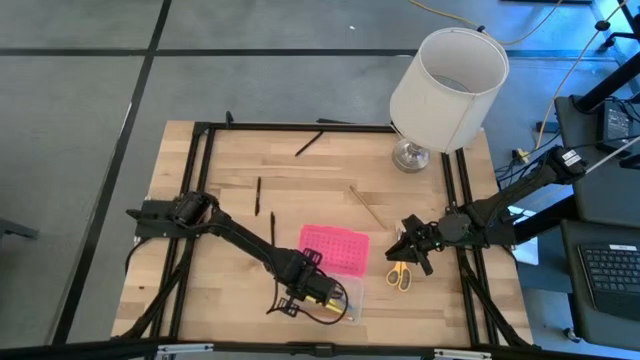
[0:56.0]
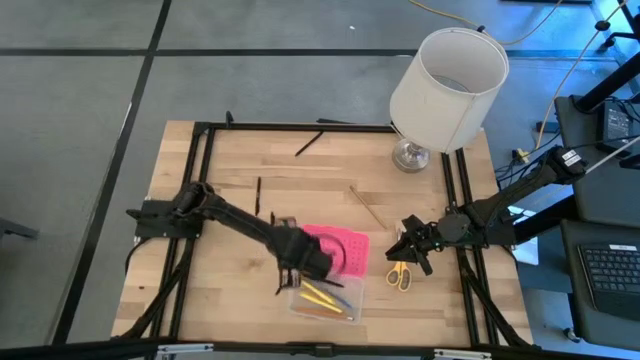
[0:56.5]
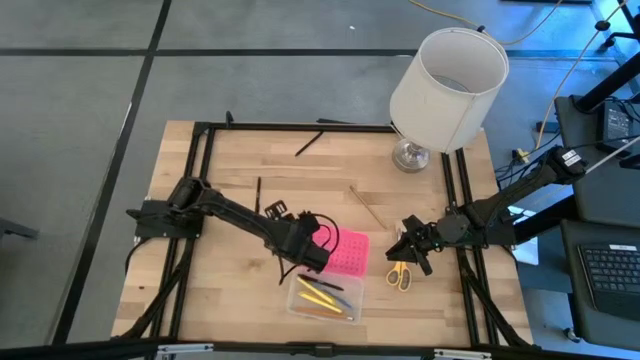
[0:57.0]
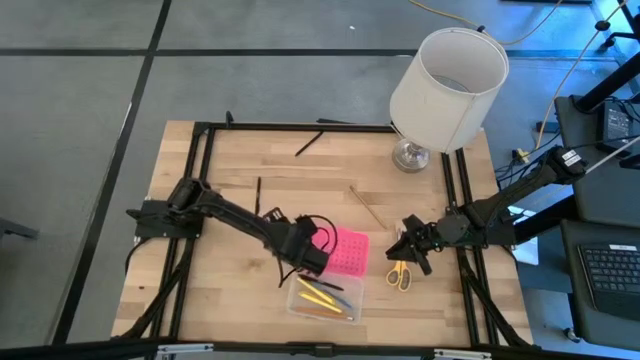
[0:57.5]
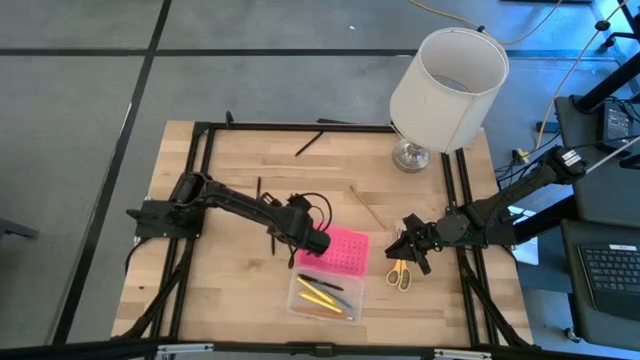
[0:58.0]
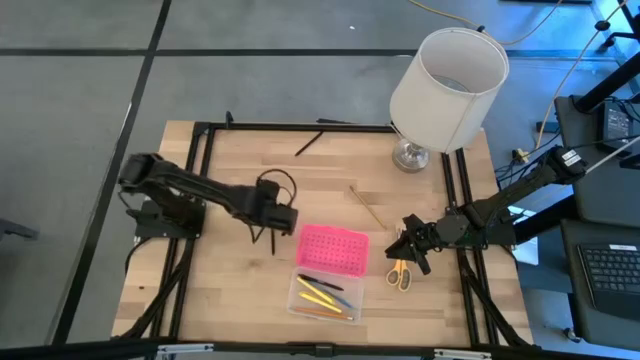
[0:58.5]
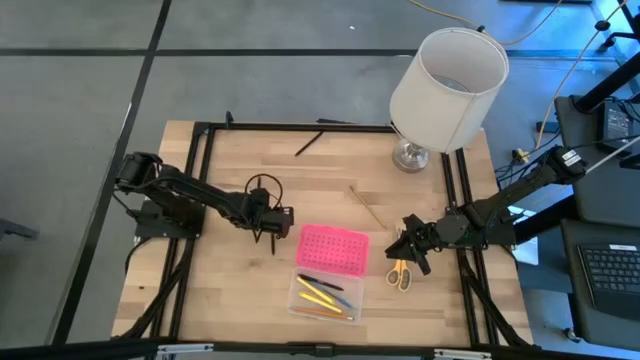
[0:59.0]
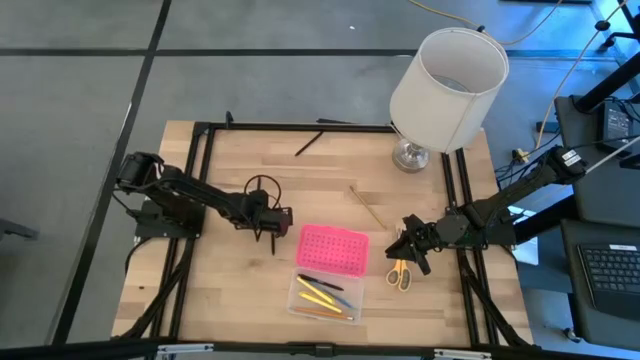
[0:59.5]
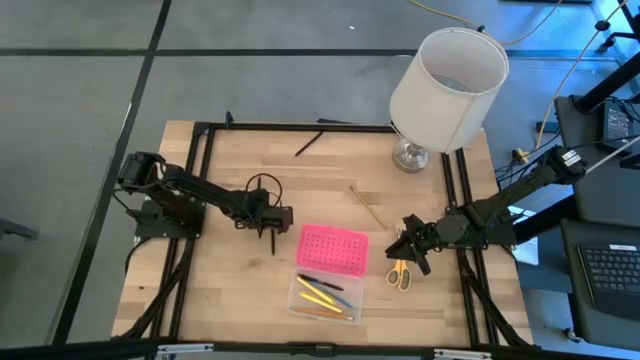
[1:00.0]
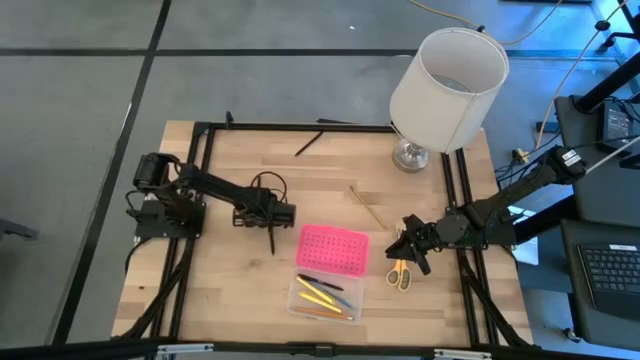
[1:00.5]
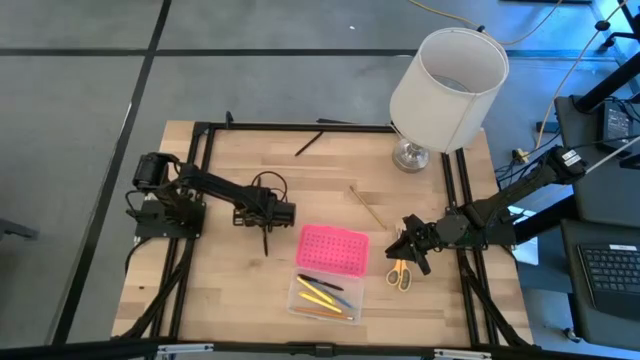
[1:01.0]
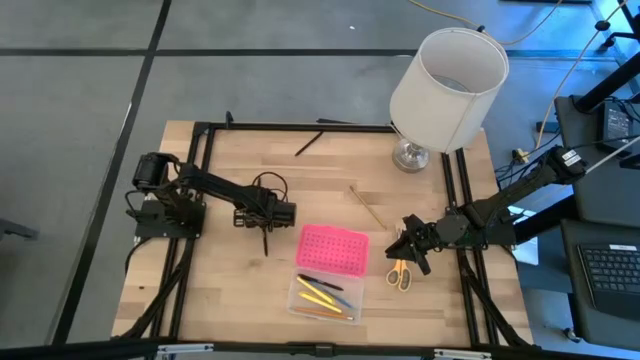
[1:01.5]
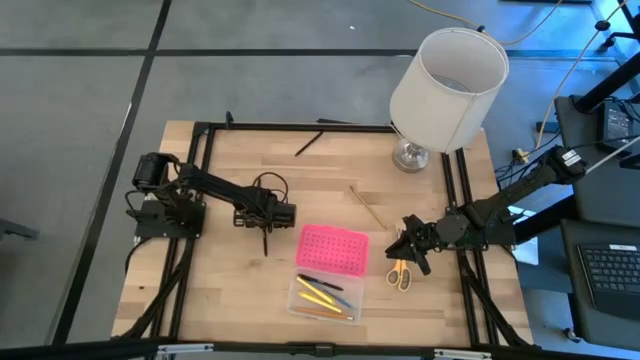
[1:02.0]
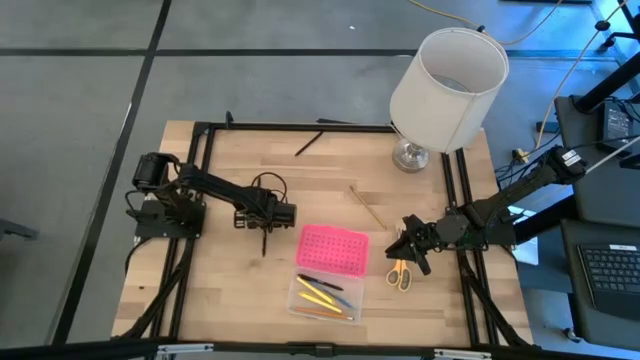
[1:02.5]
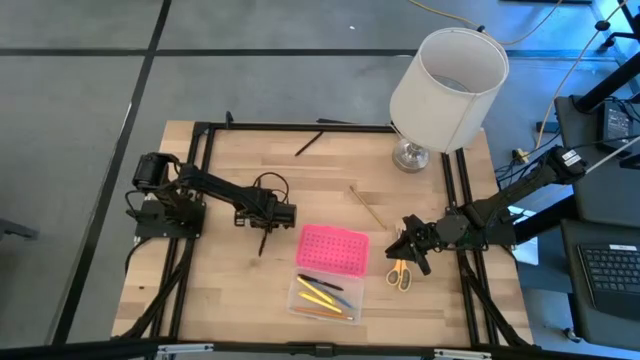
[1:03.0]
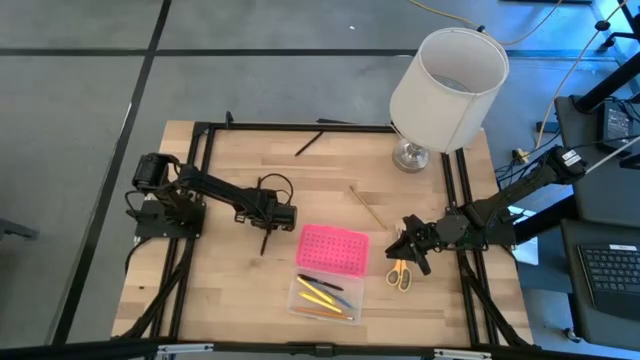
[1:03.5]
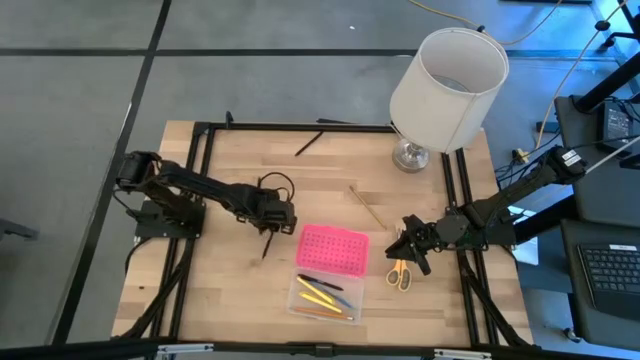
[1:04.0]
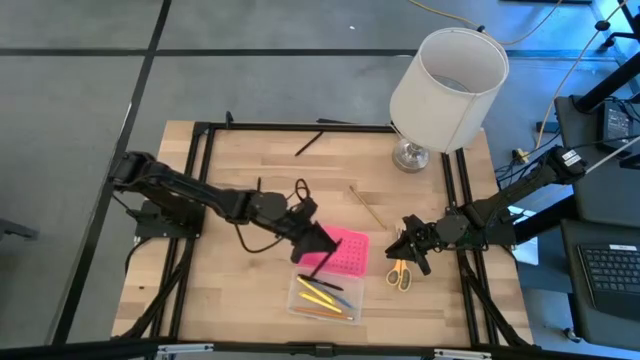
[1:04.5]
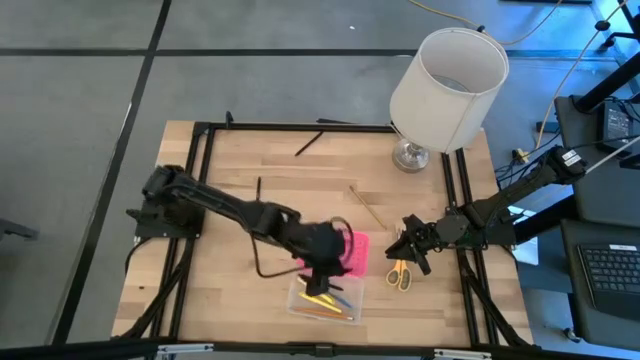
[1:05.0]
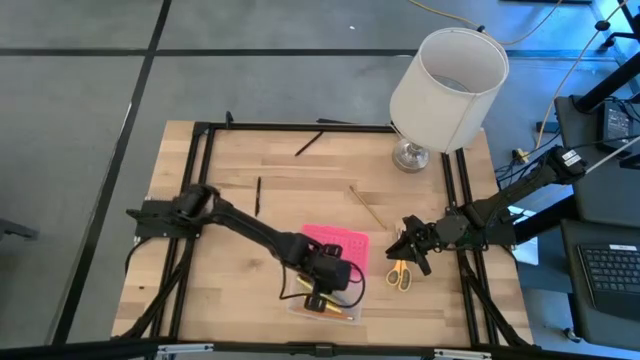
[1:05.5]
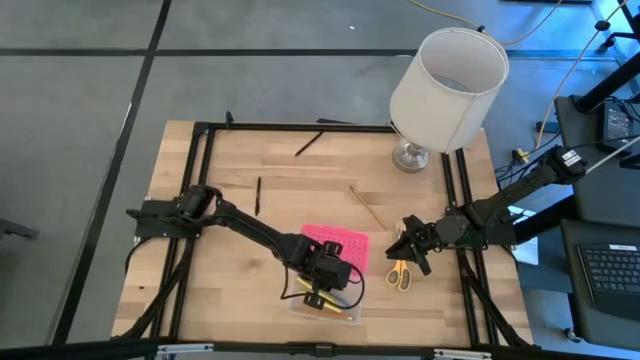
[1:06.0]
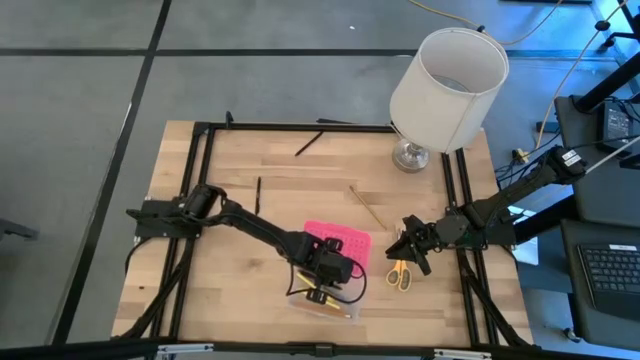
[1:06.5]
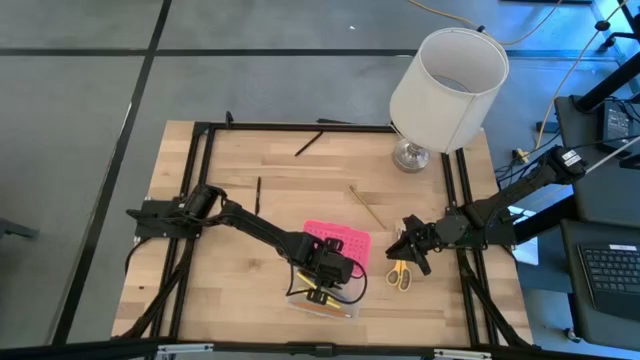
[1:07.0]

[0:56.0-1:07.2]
Task: Pick & place school supplies into a supply box
Put the black pen into the pink supply box

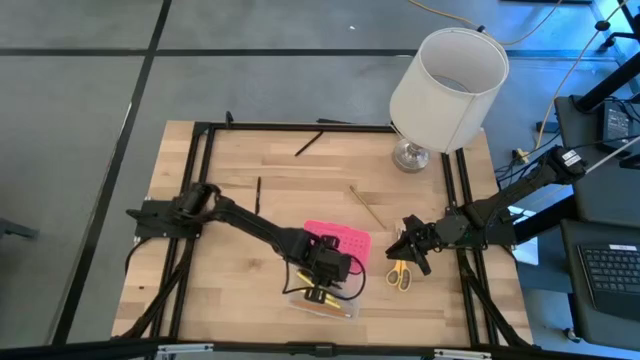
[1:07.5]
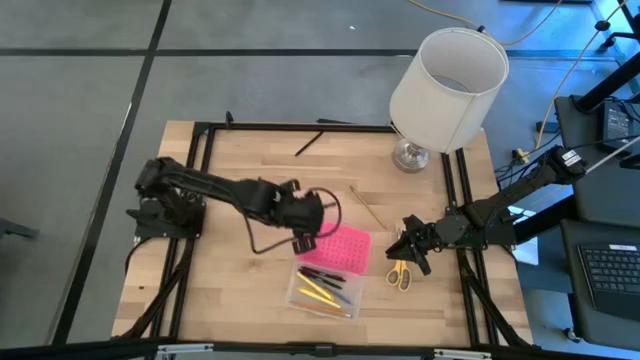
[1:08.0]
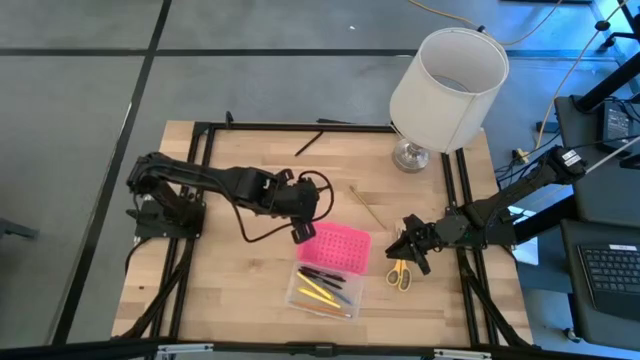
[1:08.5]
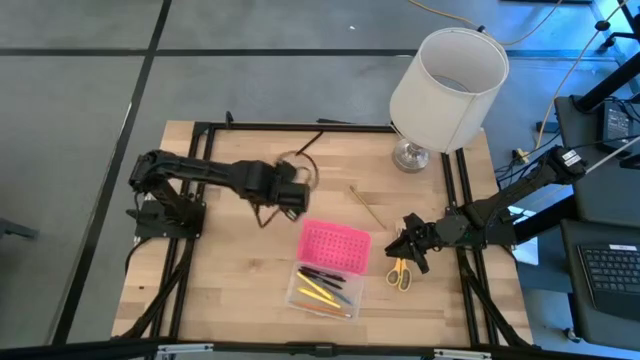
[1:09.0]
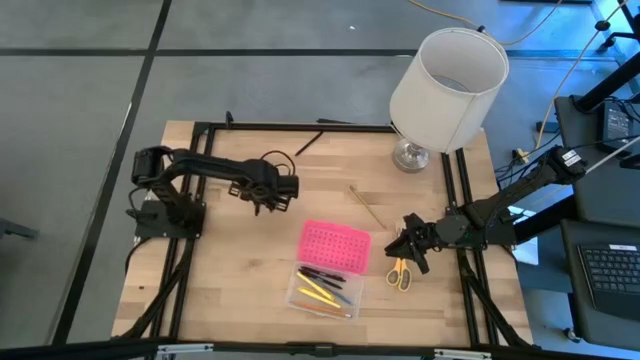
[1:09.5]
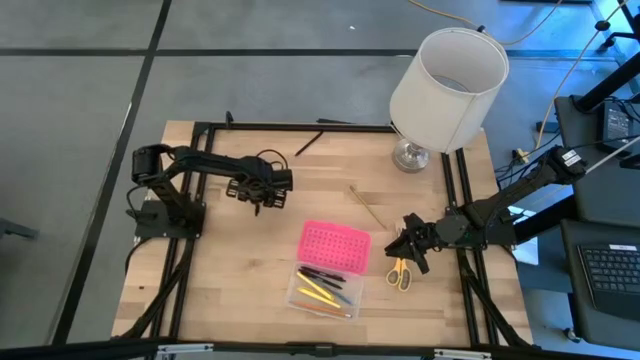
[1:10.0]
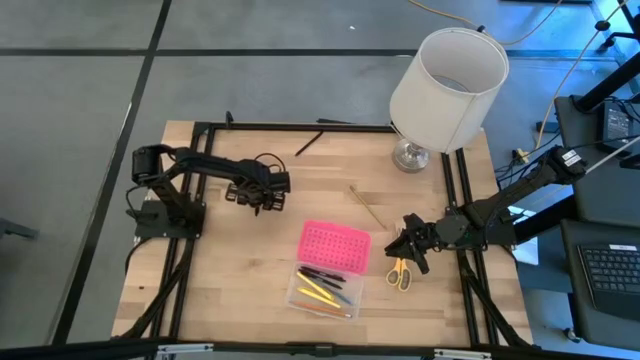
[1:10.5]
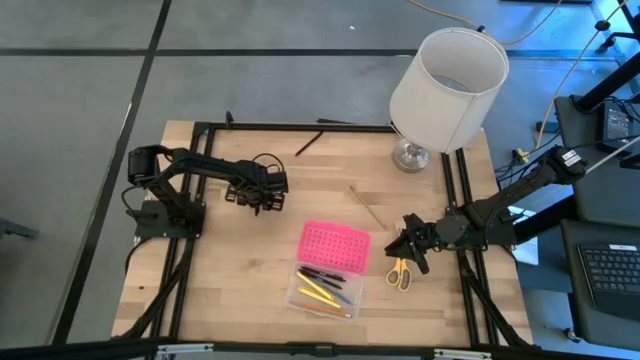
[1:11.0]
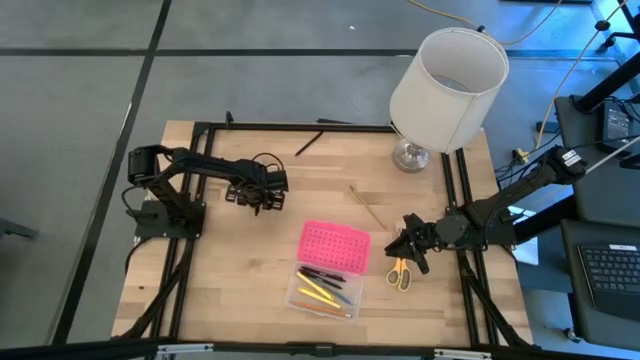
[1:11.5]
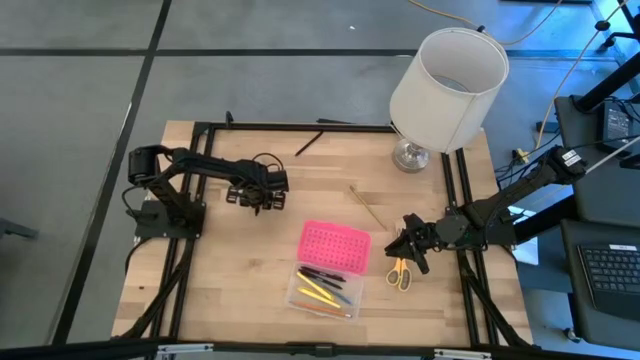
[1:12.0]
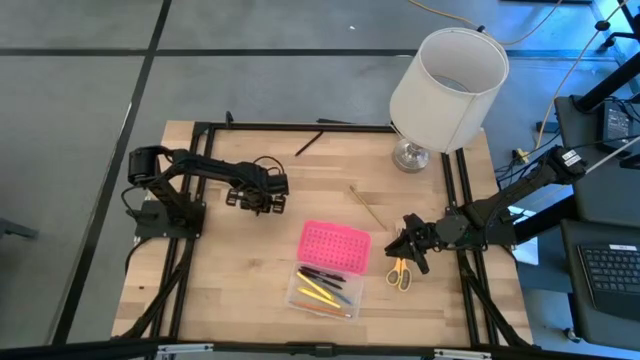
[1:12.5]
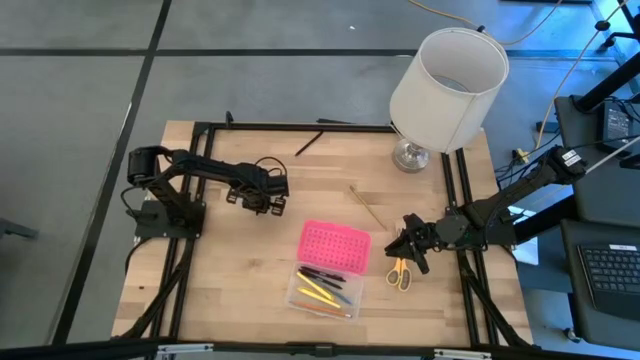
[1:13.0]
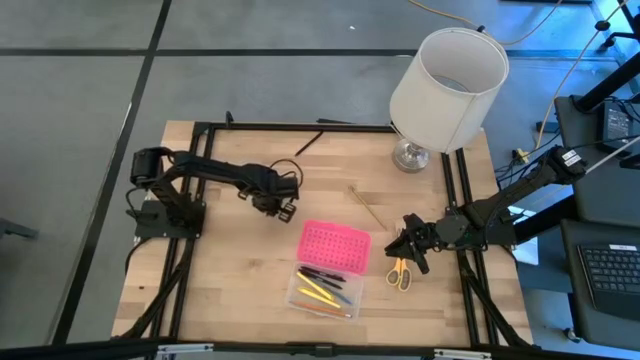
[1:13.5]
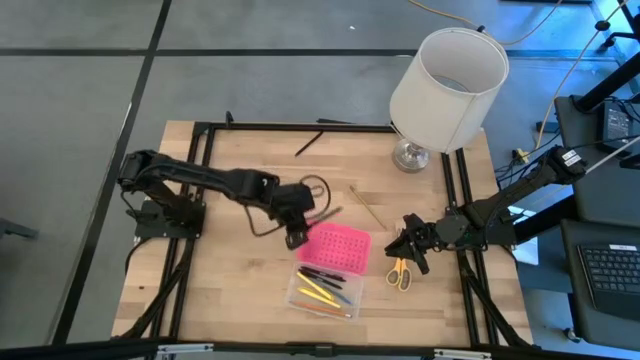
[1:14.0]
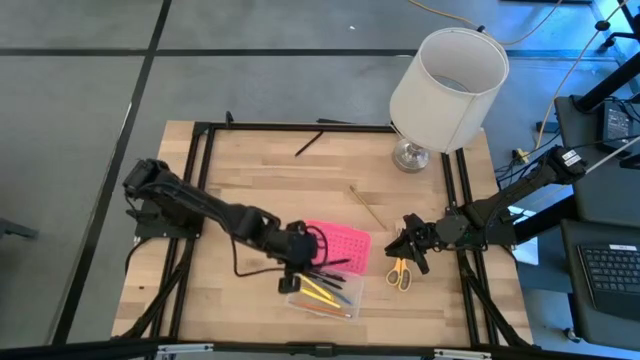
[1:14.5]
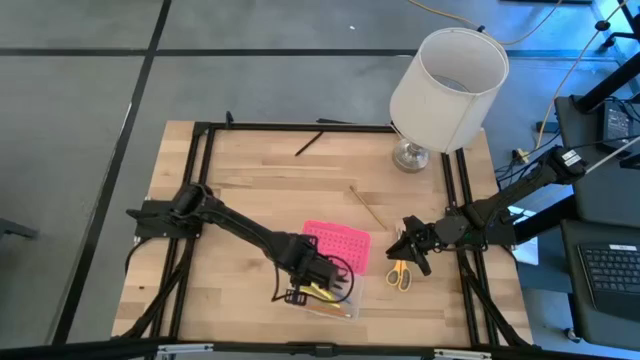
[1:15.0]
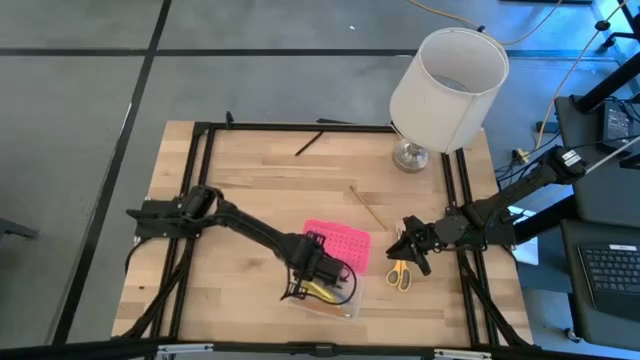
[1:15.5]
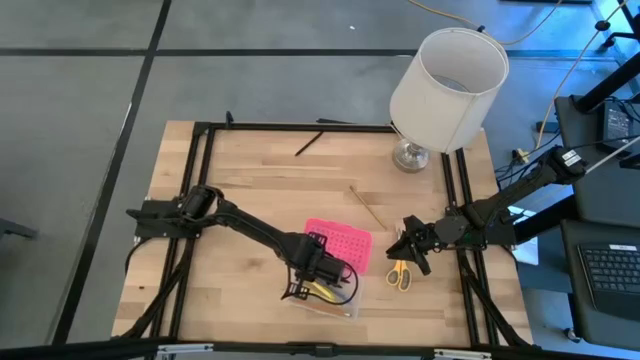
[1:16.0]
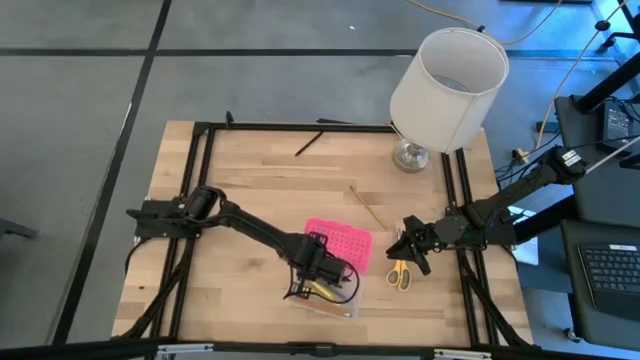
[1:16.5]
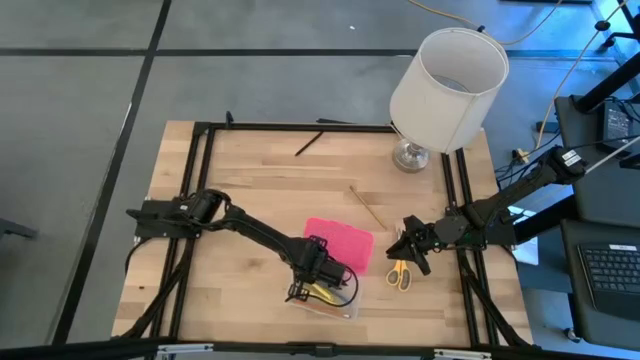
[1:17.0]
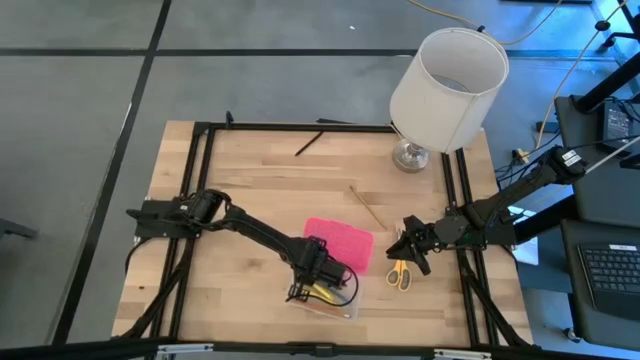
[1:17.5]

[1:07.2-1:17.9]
Put the black pen into the pink supply box
